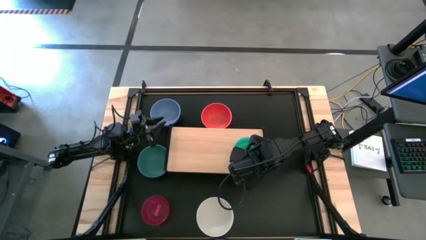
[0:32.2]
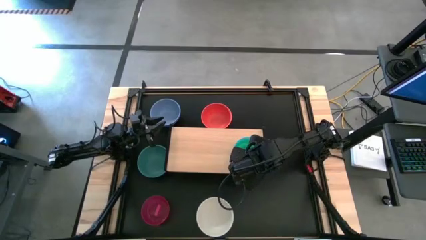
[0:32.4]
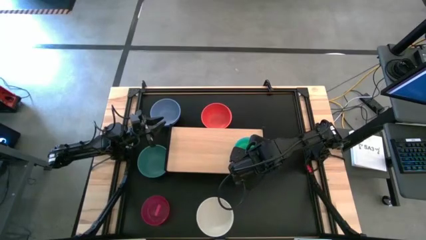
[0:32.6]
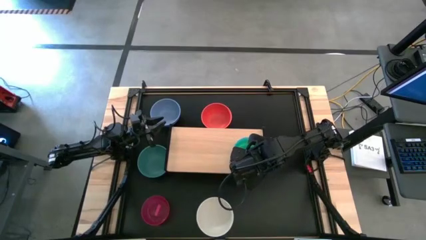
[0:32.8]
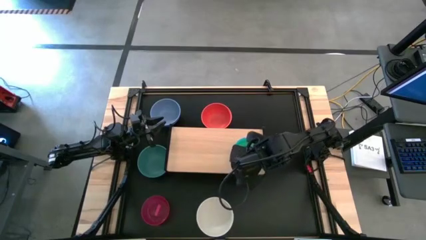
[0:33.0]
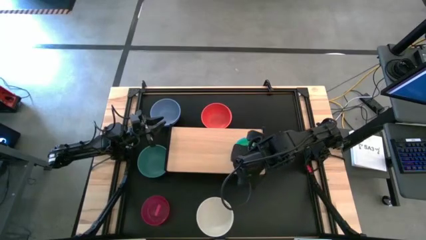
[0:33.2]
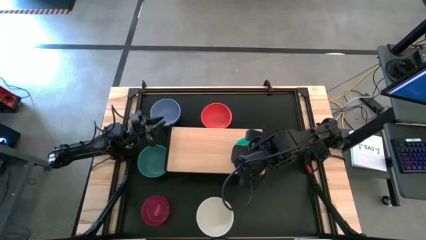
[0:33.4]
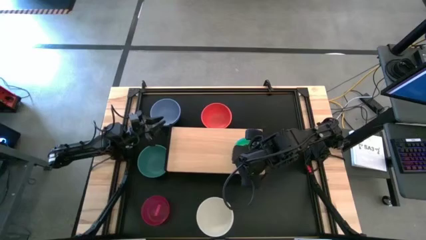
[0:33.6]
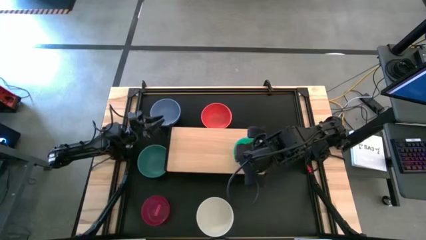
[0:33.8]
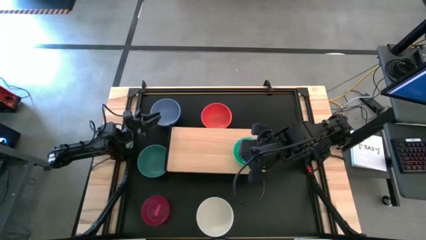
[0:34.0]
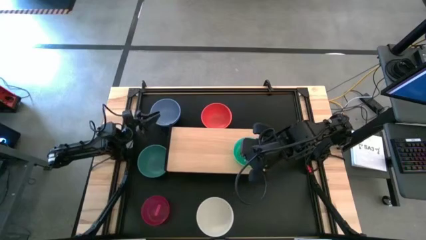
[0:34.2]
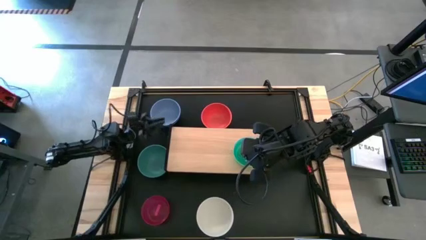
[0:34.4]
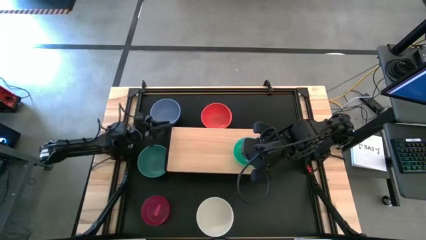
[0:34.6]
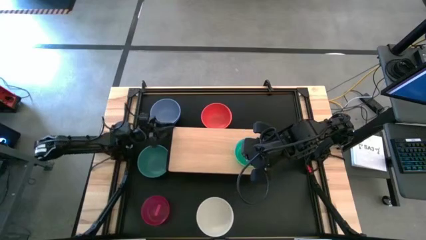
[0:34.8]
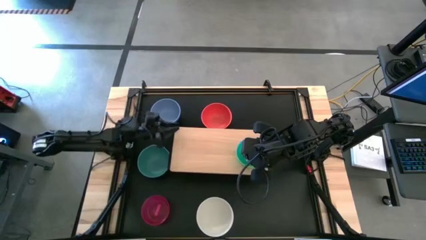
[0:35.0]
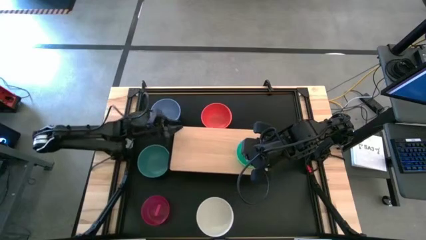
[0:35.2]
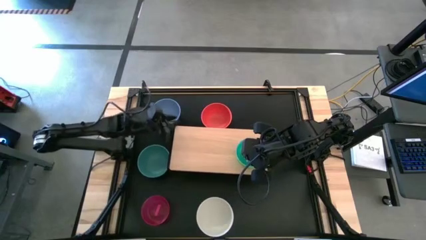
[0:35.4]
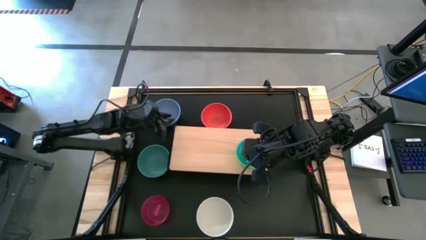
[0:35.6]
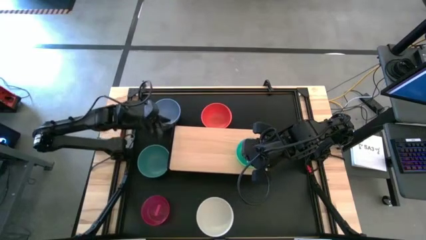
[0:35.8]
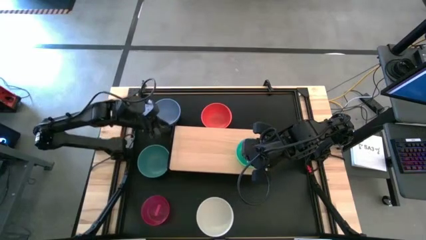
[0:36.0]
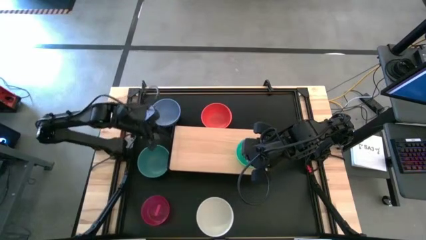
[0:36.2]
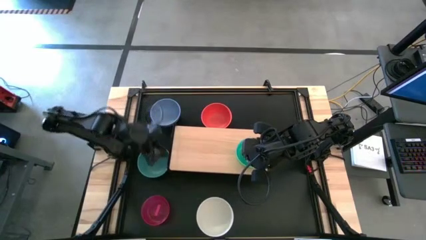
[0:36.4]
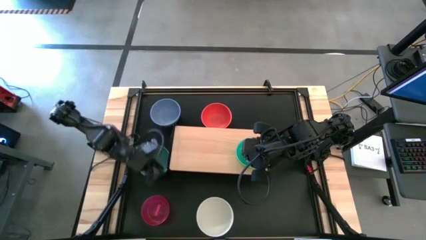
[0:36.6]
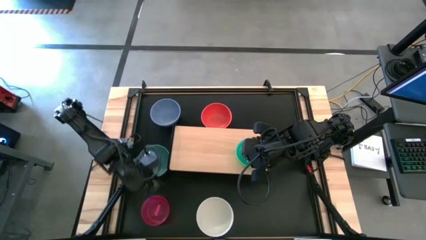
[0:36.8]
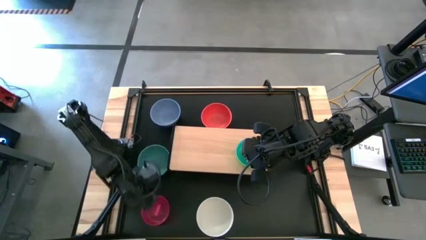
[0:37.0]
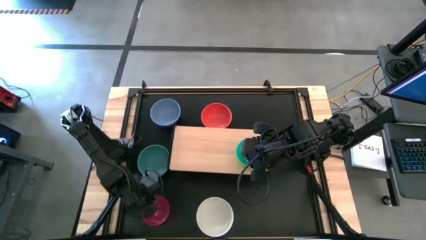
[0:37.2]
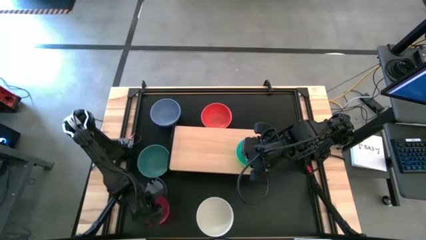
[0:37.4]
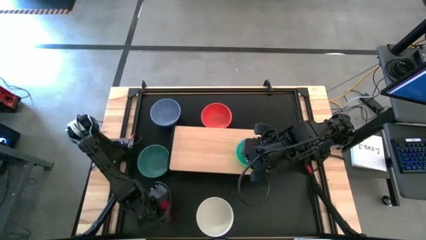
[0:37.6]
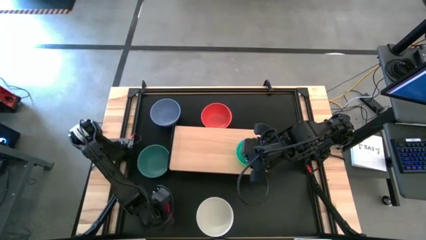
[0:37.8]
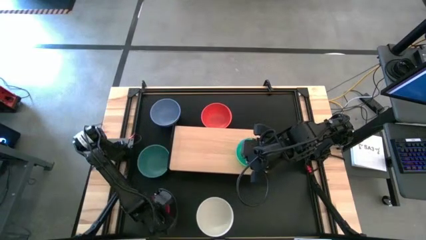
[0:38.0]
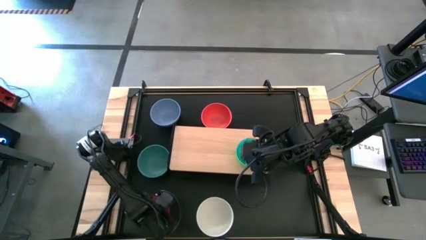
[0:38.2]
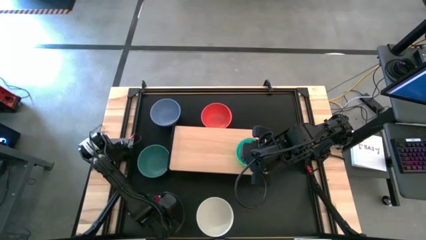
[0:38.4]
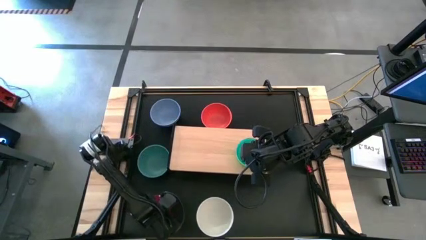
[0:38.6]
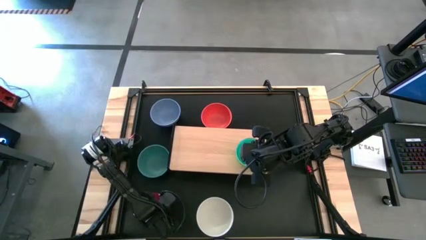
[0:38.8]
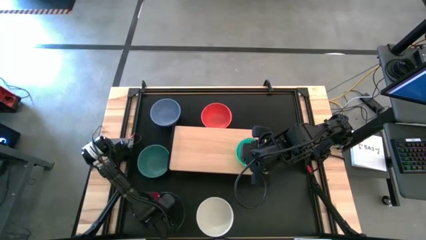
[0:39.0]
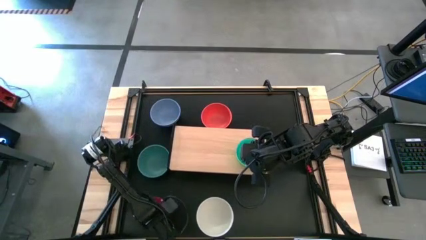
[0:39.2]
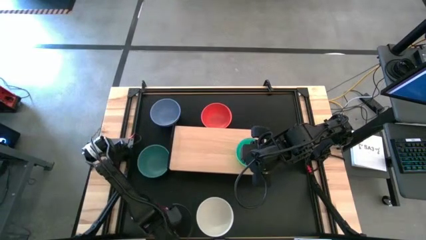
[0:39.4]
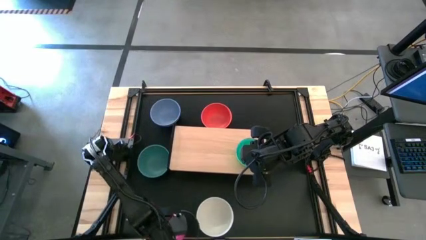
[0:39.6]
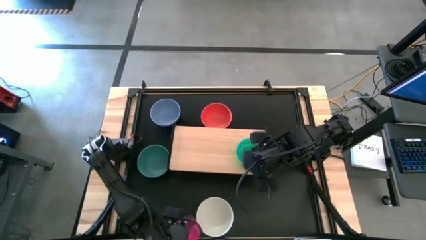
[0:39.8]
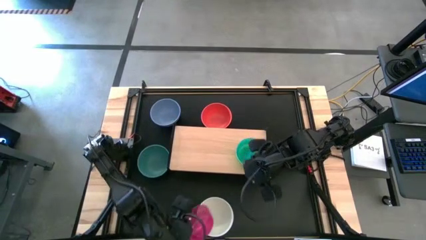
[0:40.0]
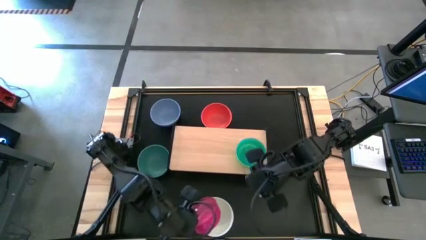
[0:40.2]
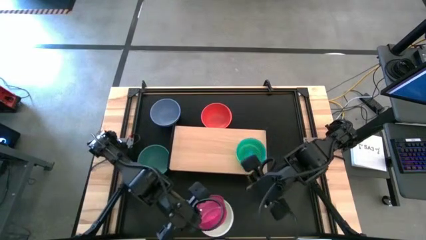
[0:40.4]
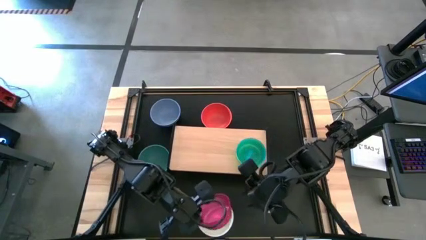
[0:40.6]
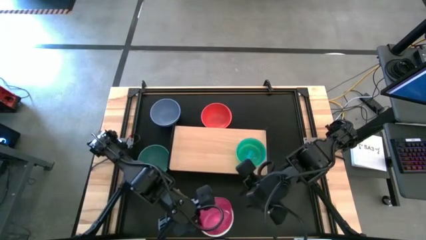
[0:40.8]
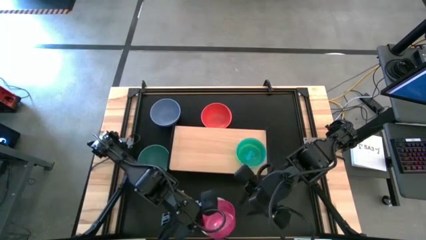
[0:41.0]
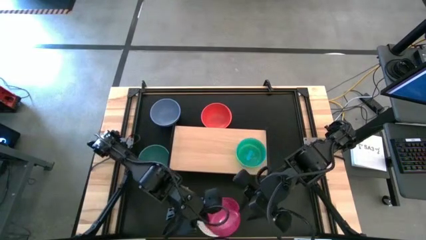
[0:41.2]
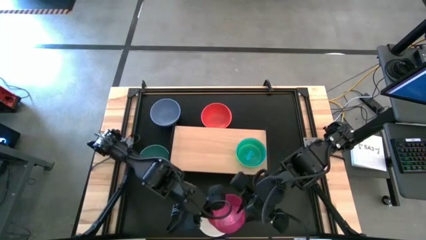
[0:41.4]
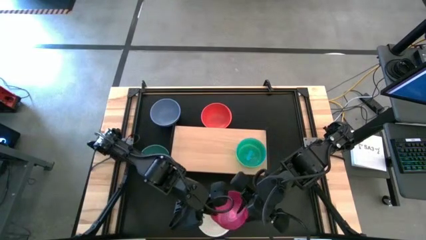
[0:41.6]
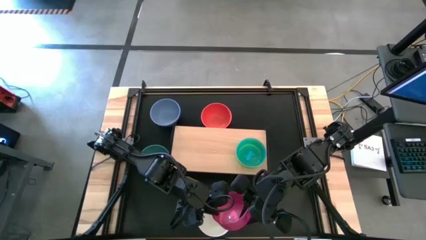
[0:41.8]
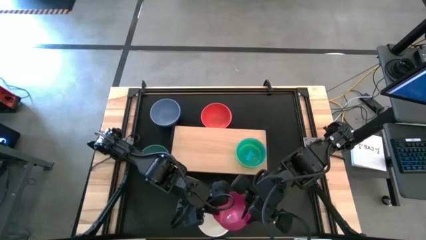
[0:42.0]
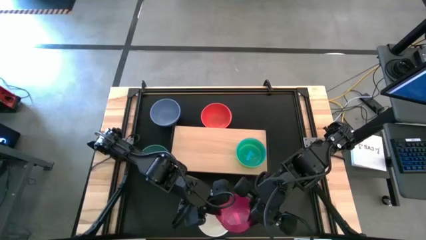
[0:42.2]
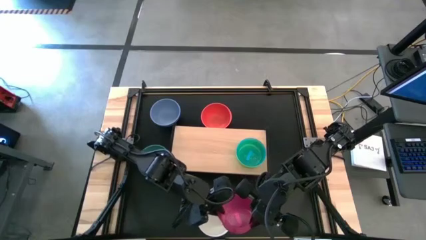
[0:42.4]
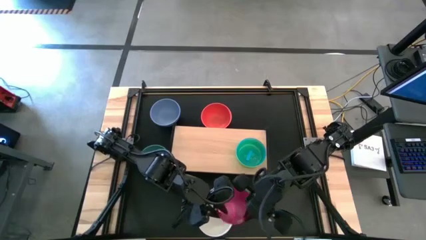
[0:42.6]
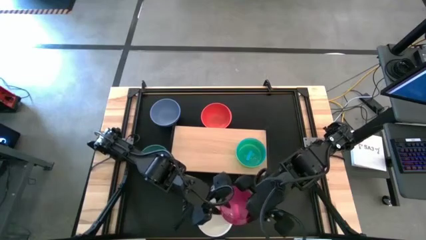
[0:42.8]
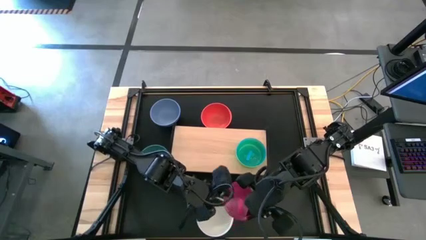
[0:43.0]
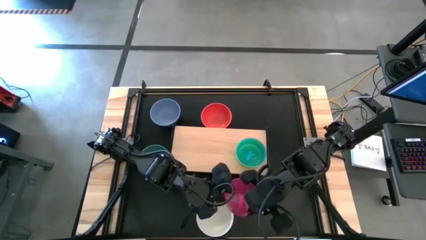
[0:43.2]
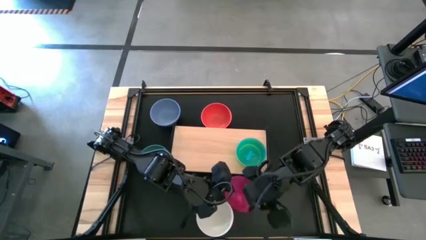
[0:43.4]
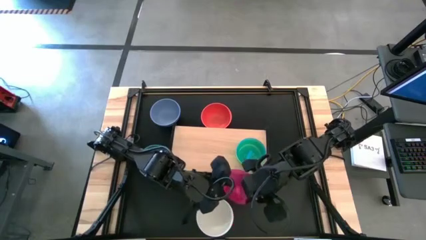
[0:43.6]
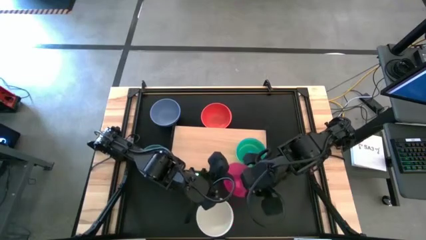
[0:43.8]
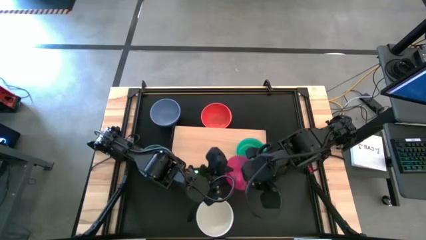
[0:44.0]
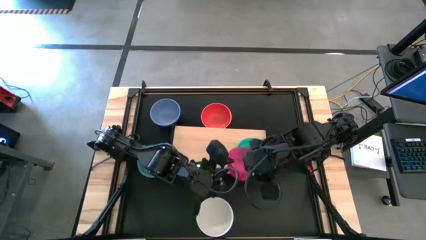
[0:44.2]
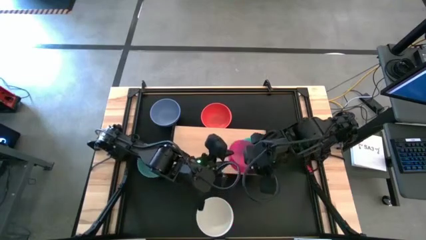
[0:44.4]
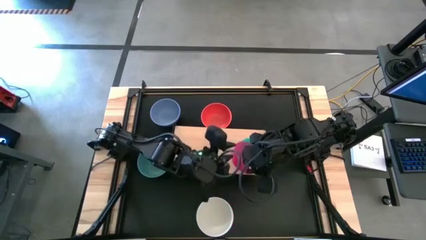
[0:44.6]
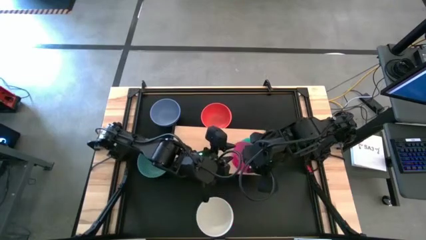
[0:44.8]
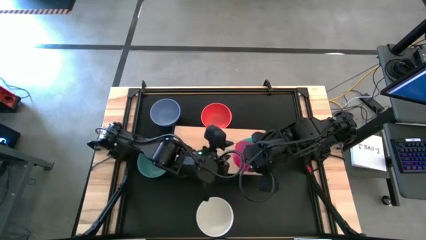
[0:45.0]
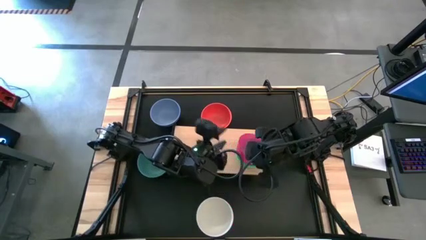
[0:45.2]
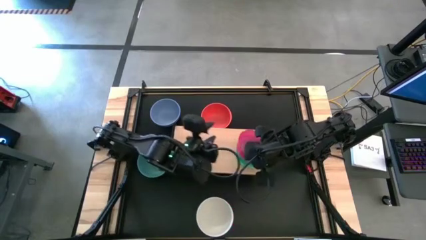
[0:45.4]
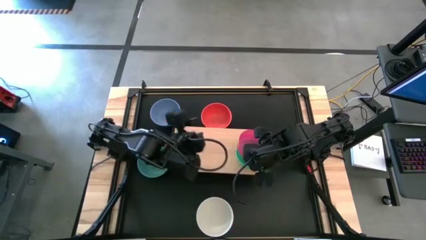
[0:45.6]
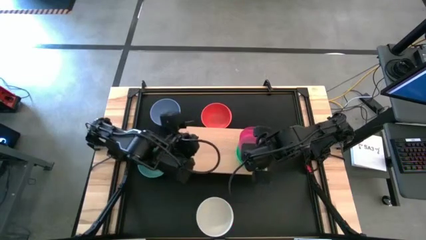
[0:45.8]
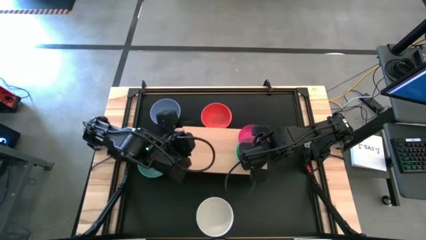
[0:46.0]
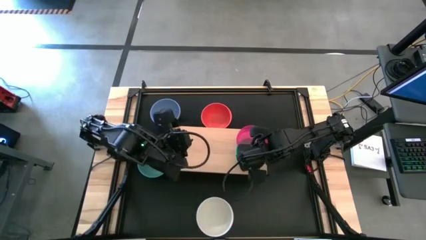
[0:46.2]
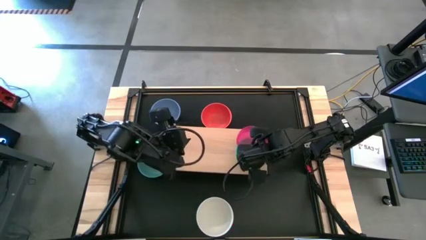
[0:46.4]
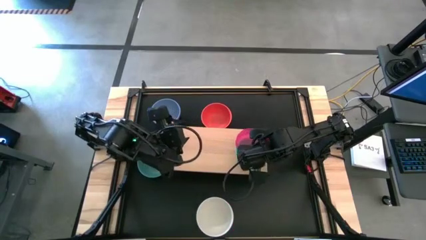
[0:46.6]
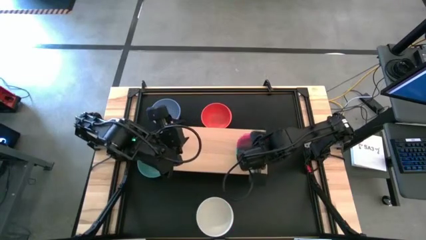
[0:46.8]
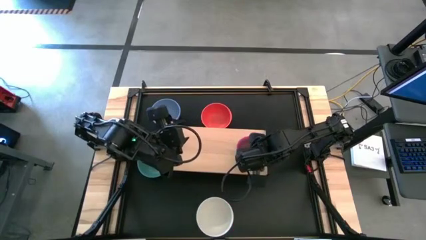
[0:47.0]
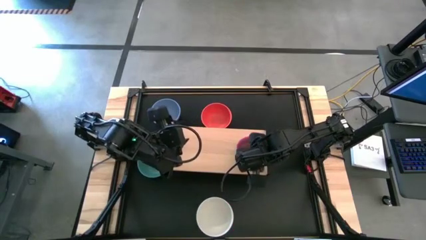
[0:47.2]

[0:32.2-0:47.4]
Task: Place and stack bowls onto a shelf
Stack the small pink bowl on top of the blue bowl on the shelf
